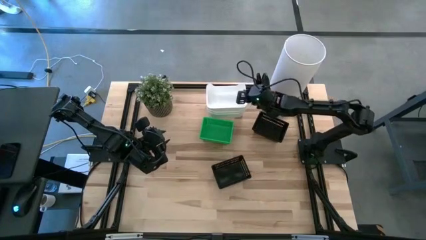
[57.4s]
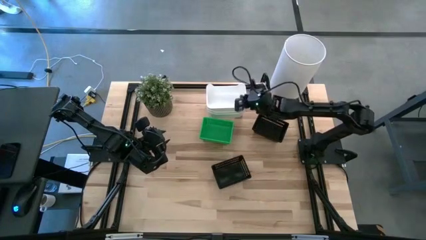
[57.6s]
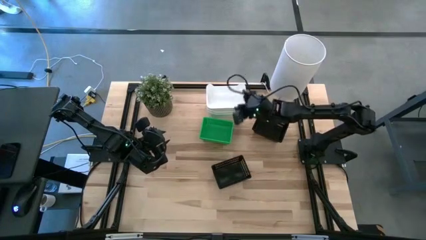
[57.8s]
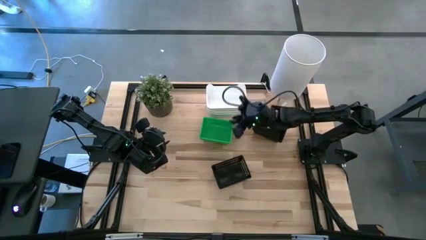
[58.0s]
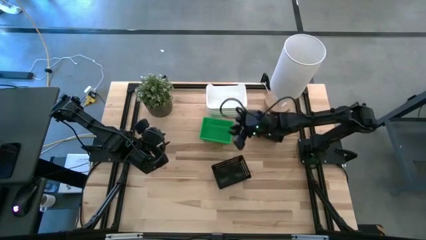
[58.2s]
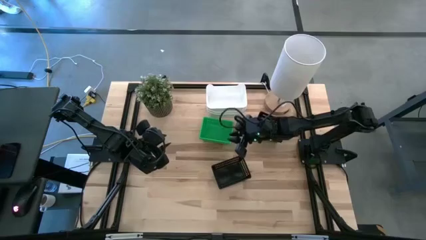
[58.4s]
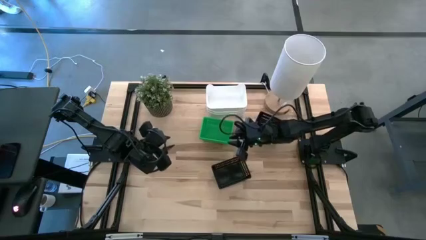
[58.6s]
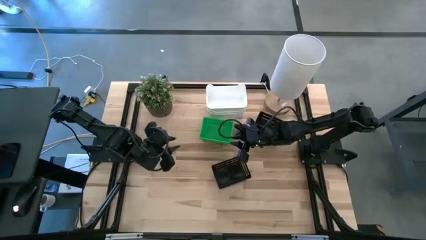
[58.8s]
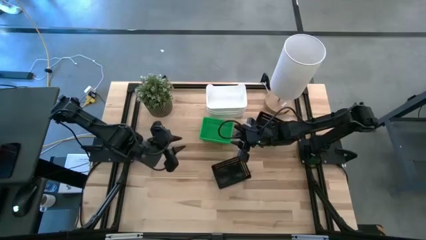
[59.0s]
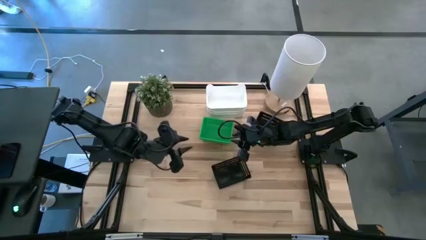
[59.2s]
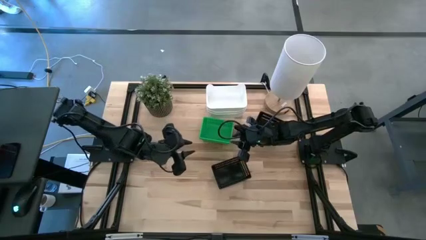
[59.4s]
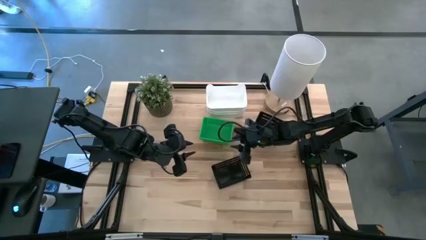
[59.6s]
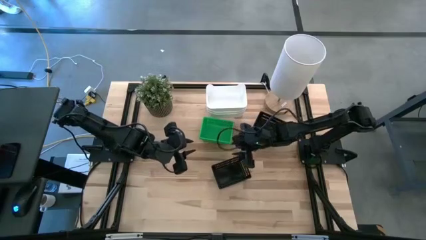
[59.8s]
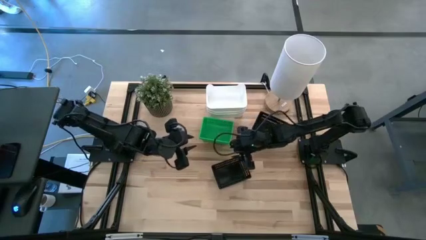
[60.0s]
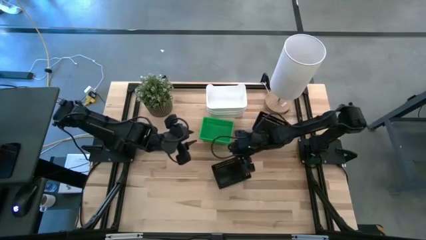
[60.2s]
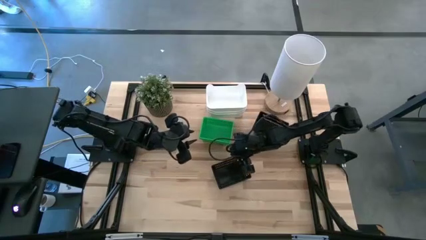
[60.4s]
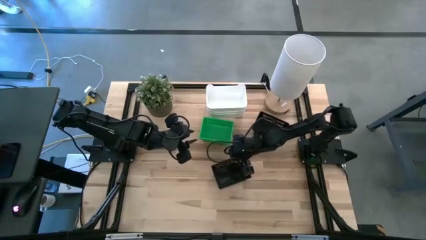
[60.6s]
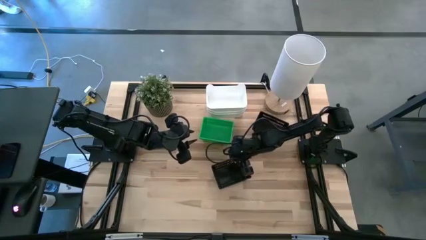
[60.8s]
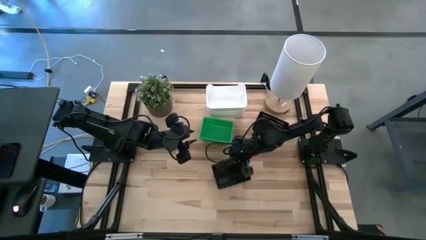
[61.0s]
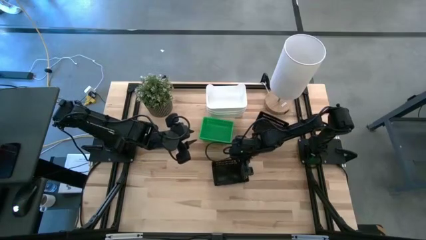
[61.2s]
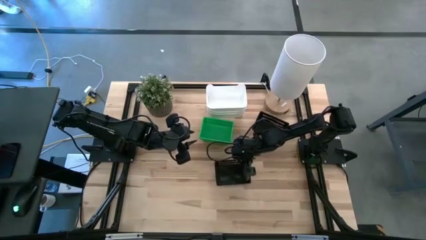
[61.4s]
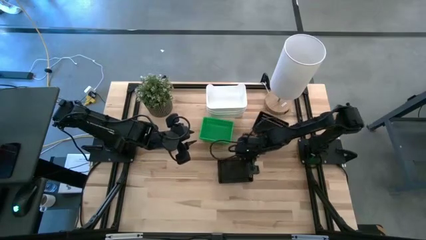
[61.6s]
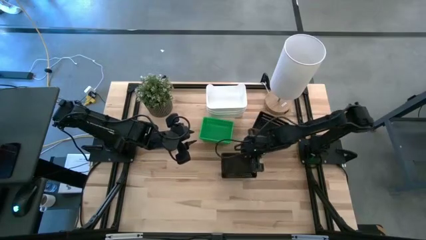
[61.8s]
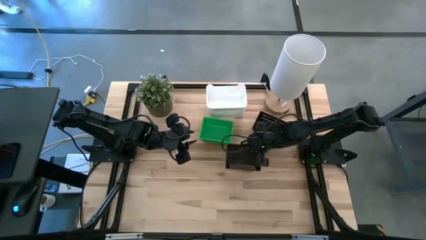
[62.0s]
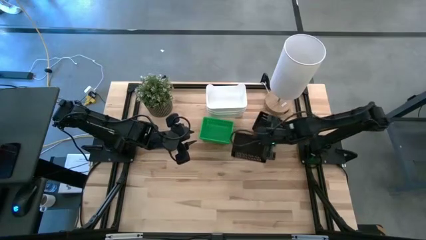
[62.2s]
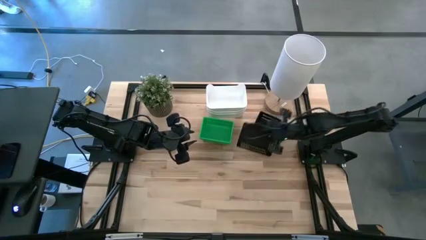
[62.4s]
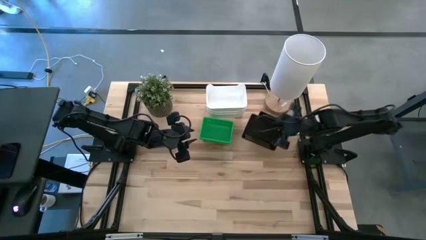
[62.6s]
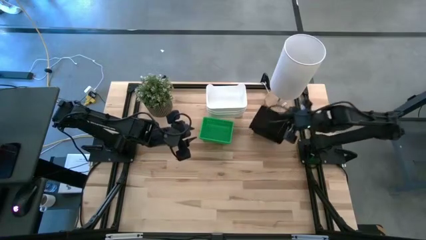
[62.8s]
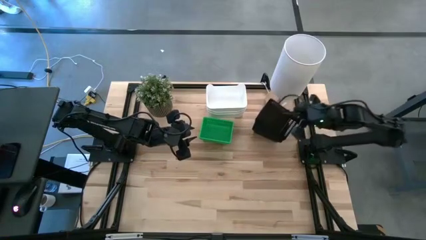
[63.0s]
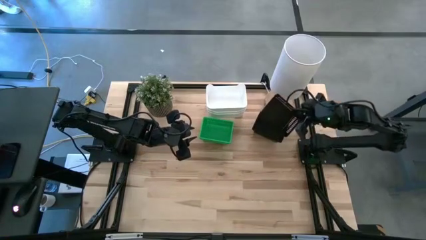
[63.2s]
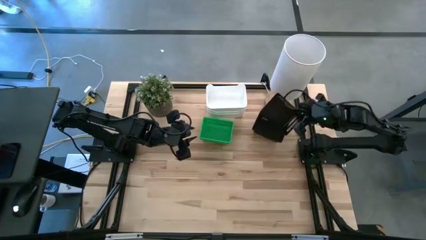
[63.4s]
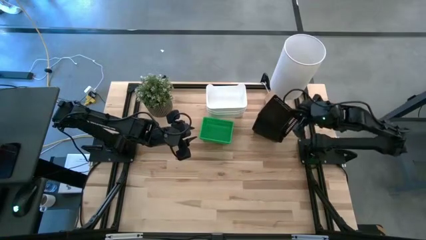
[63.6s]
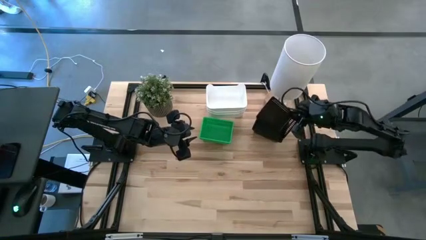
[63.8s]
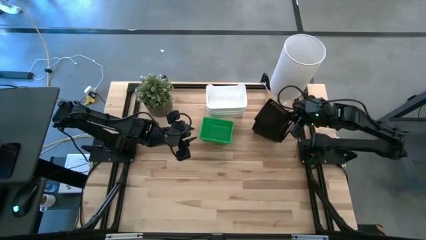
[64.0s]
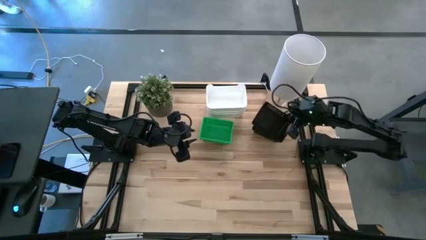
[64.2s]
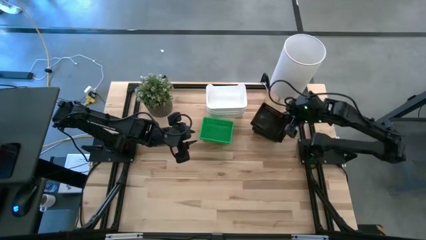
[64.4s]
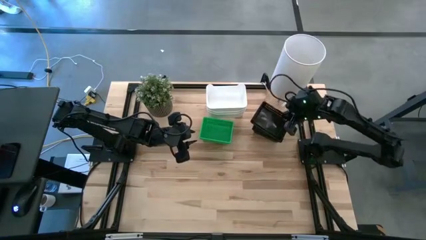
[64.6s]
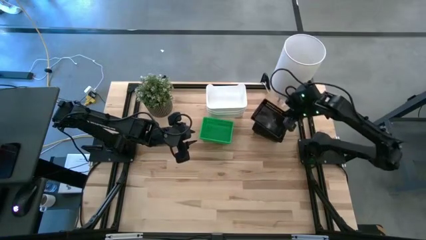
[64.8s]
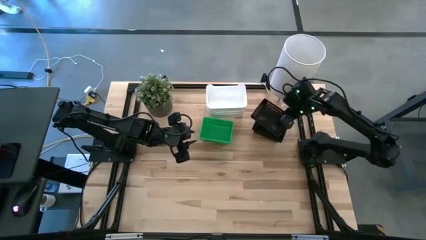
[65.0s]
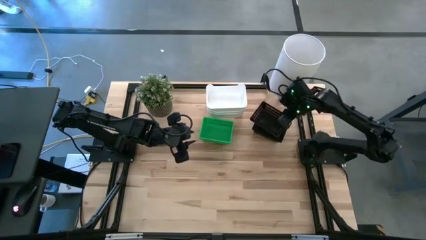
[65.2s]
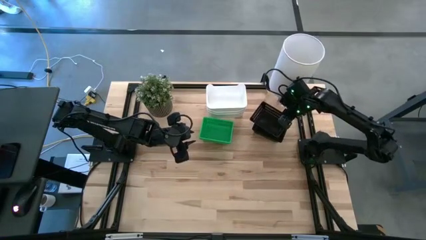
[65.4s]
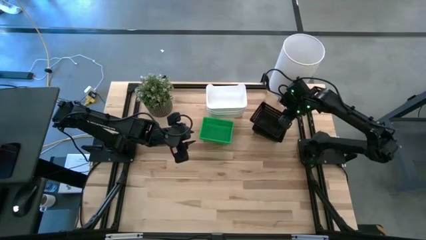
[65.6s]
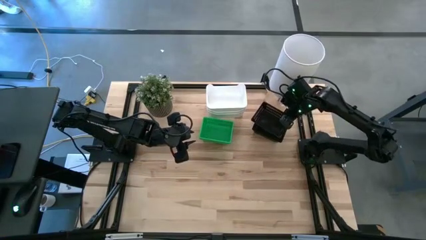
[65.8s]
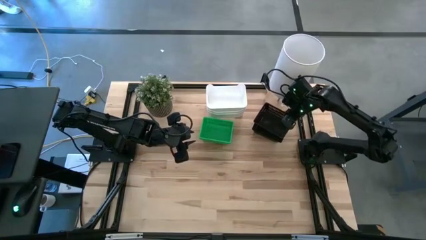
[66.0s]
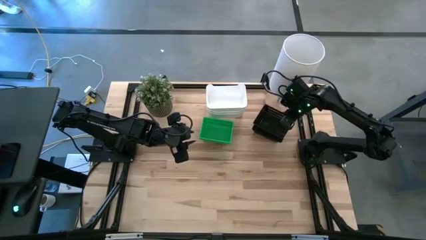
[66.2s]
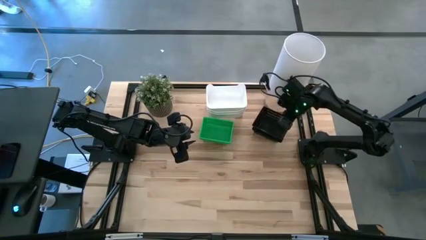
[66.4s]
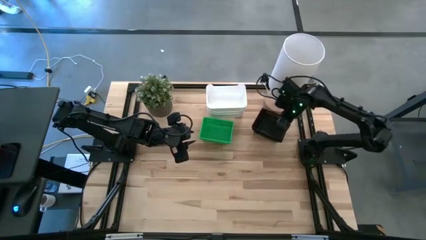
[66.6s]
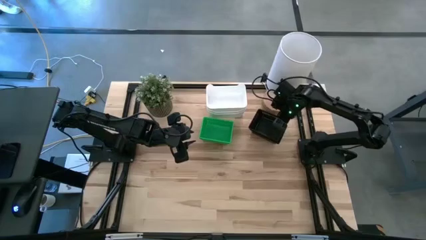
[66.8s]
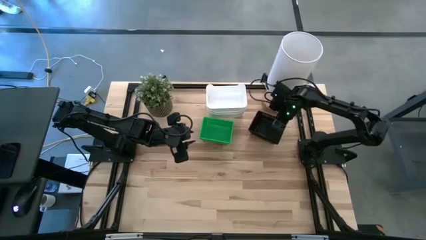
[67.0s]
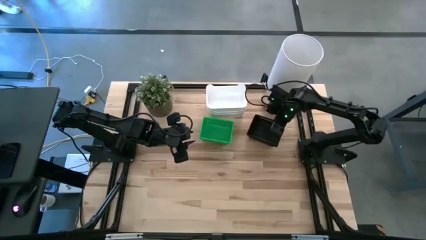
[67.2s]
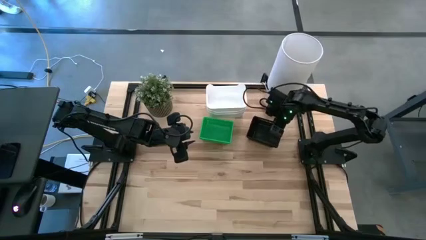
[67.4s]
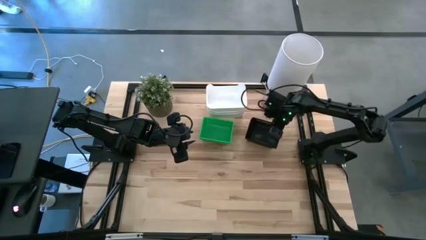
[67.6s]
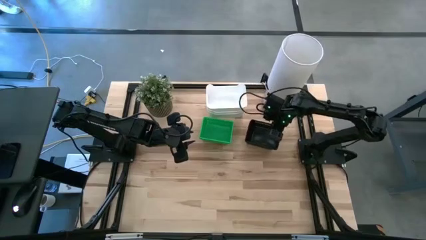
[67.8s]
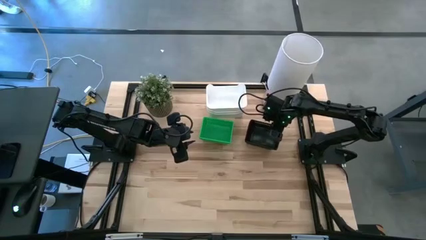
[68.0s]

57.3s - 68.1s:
Stack the bottom black bin on top of the top black bins

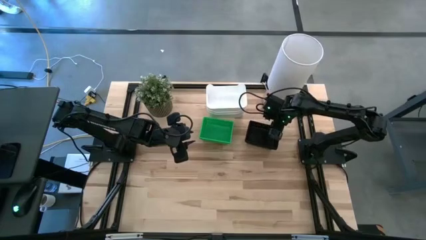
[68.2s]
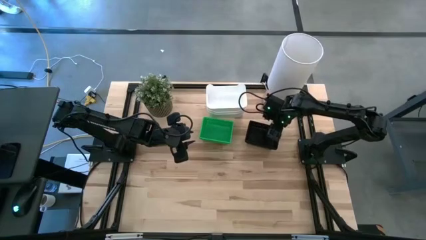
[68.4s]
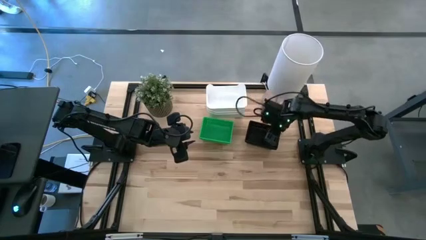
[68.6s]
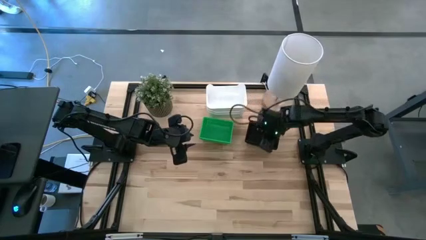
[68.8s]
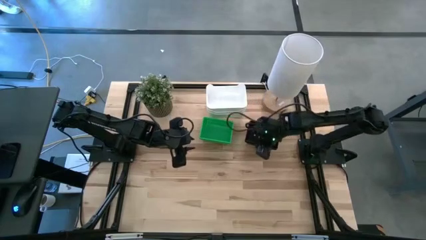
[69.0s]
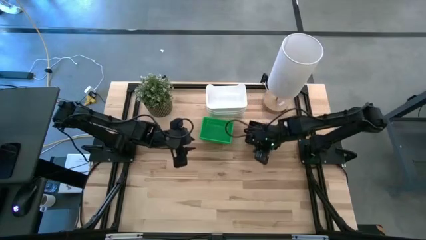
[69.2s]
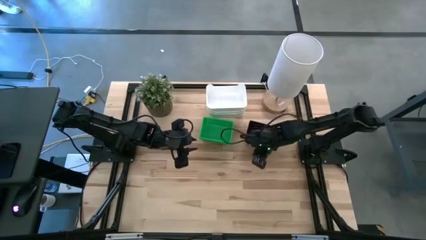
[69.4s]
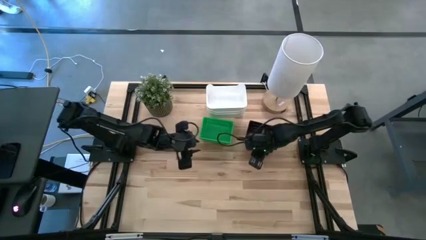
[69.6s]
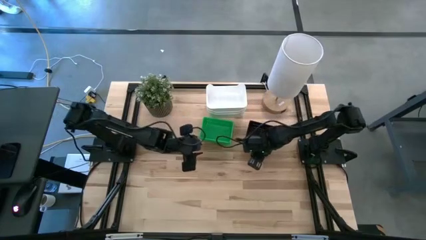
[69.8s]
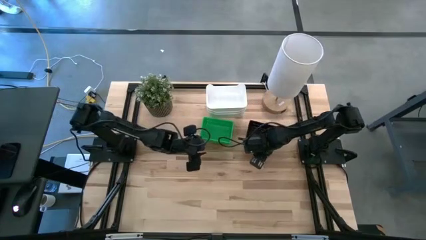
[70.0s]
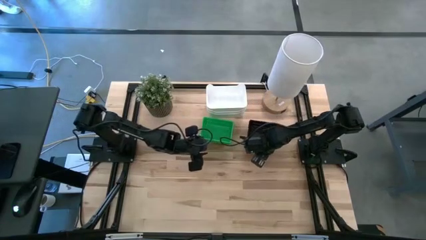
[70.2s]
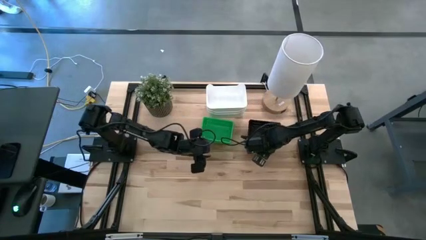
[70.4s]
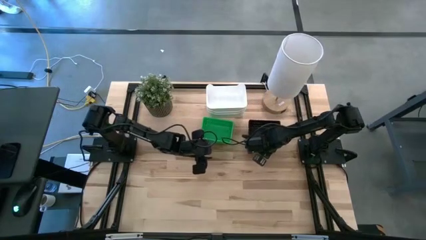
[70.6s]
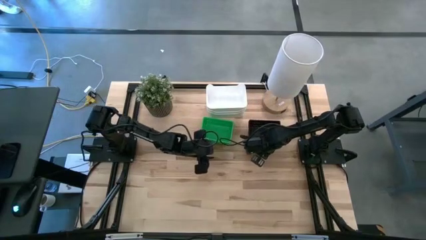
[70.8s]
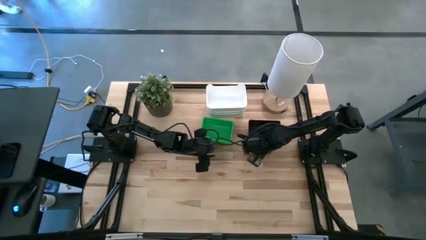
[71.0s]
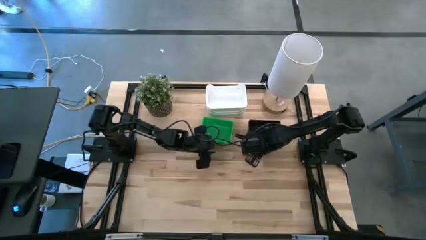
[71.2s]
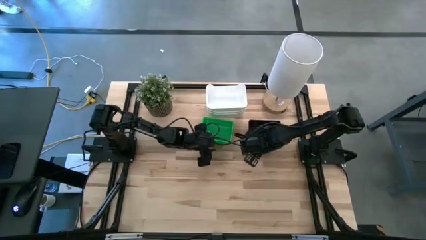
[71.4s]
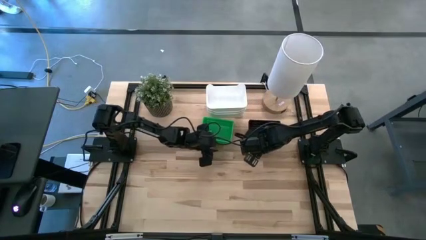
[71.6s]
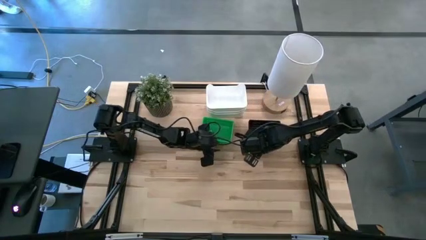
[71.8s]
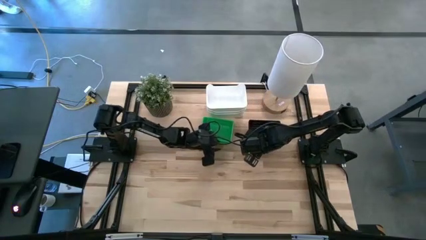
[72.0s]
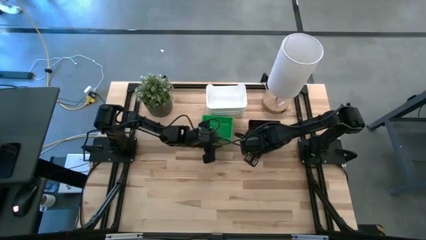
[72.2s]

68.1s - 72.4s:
Adjust the stacked bins
